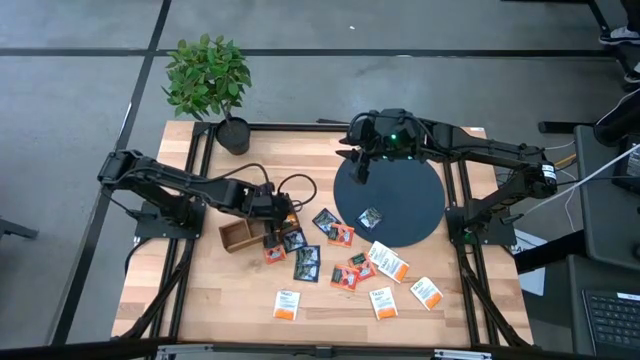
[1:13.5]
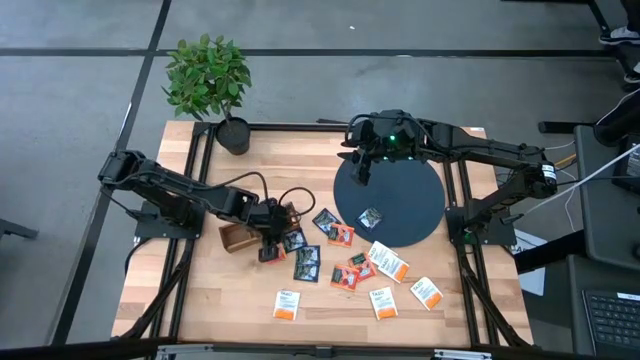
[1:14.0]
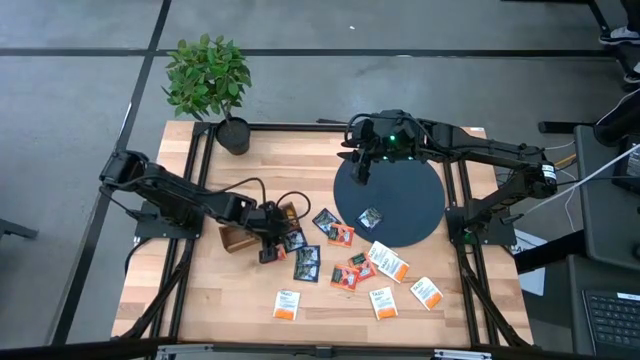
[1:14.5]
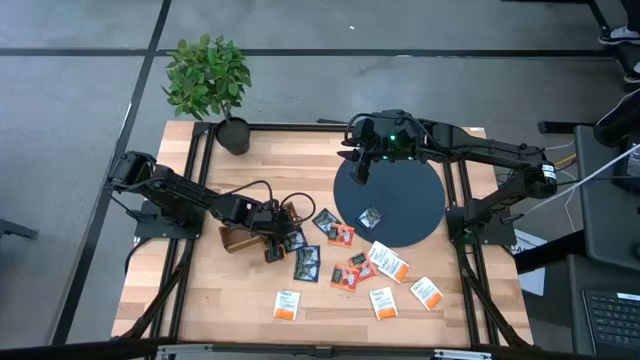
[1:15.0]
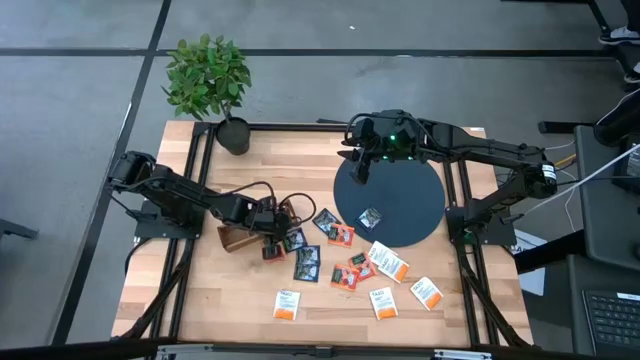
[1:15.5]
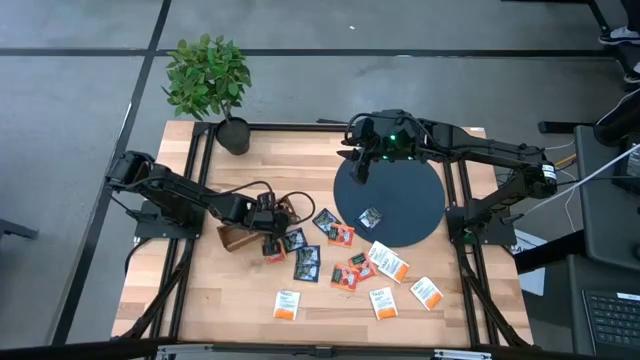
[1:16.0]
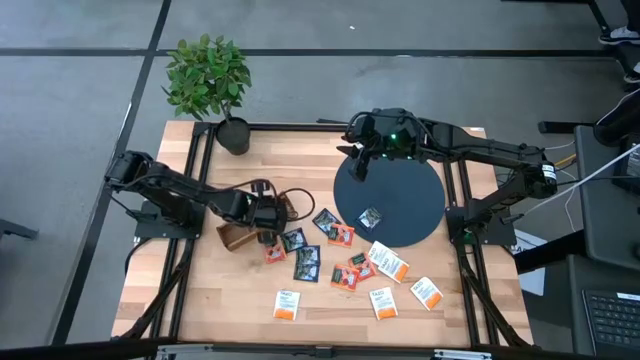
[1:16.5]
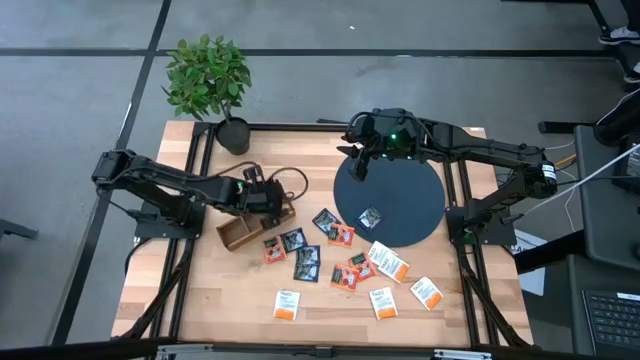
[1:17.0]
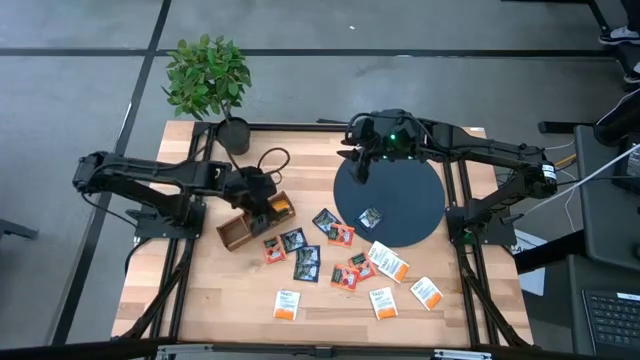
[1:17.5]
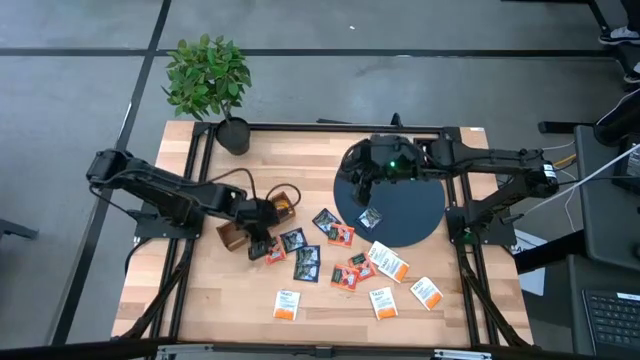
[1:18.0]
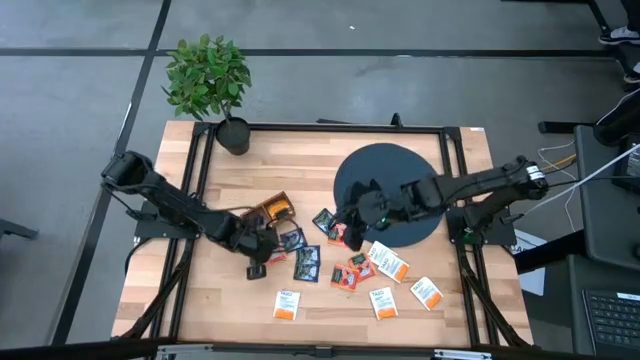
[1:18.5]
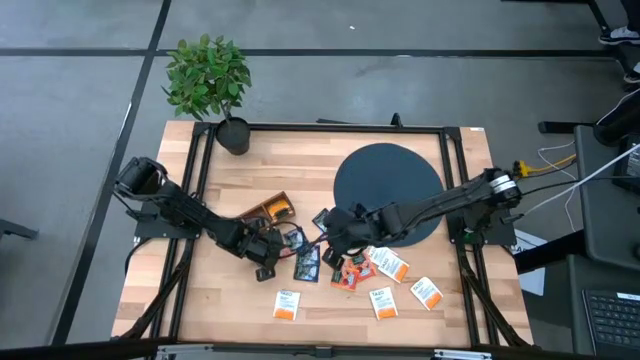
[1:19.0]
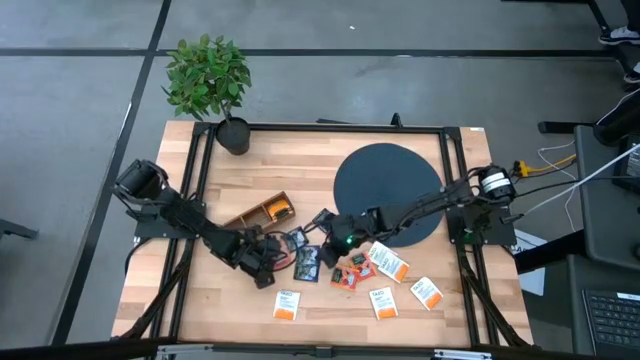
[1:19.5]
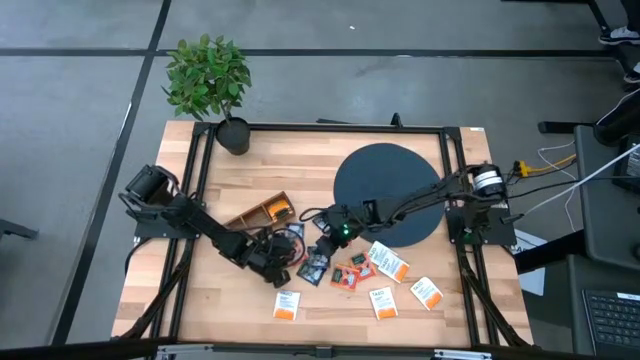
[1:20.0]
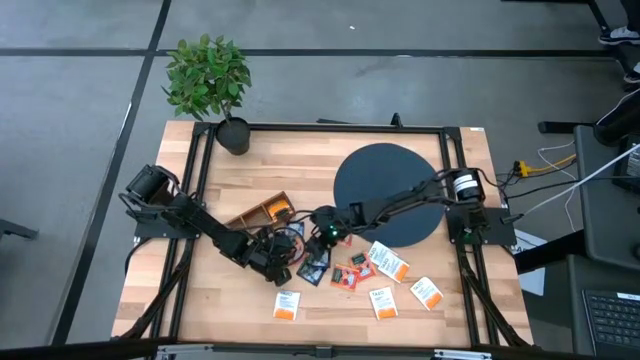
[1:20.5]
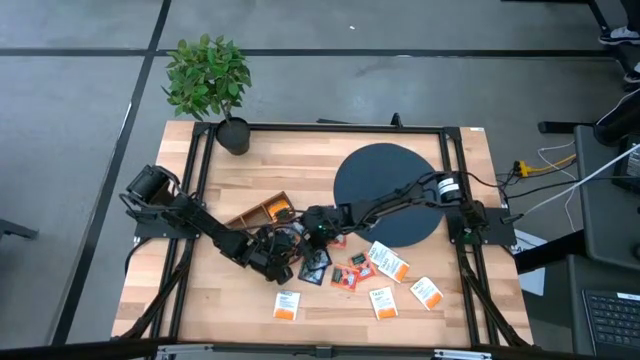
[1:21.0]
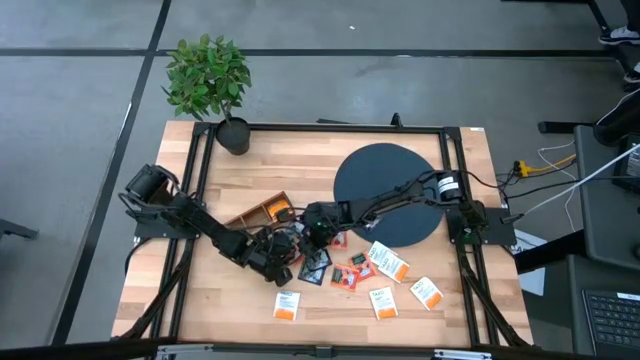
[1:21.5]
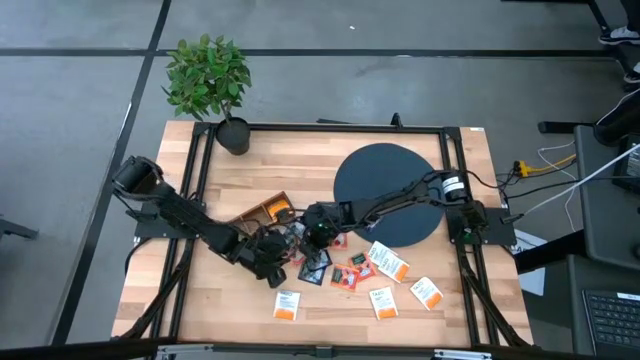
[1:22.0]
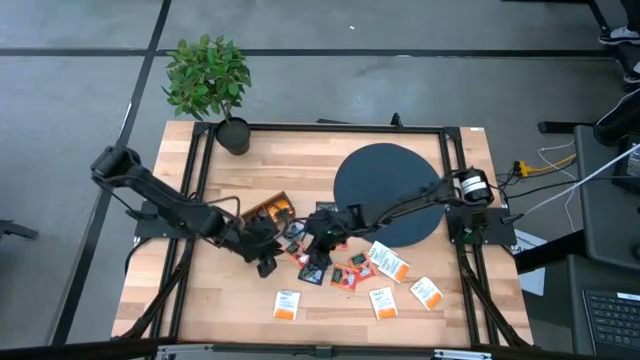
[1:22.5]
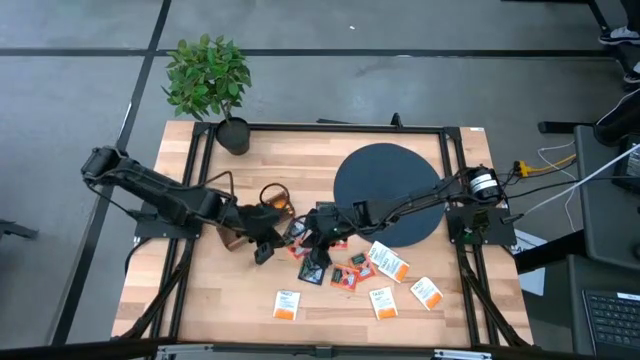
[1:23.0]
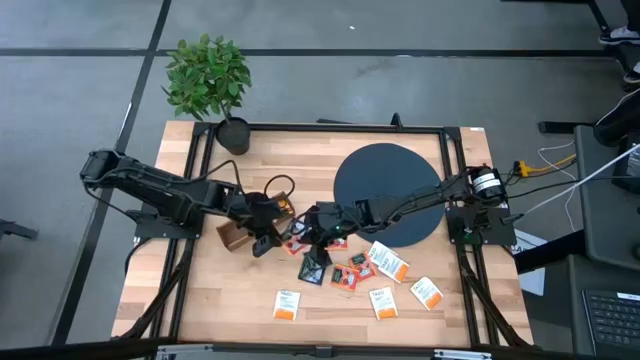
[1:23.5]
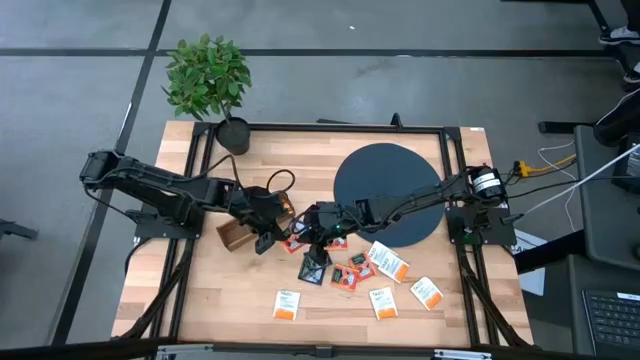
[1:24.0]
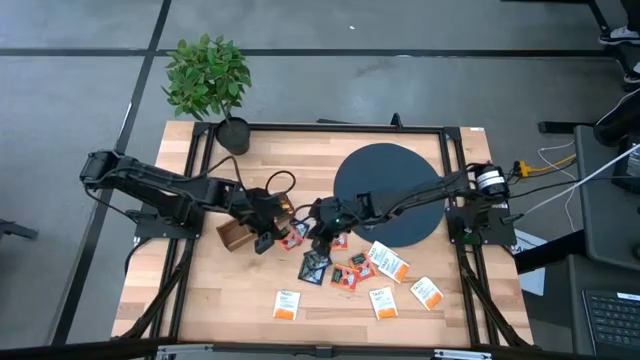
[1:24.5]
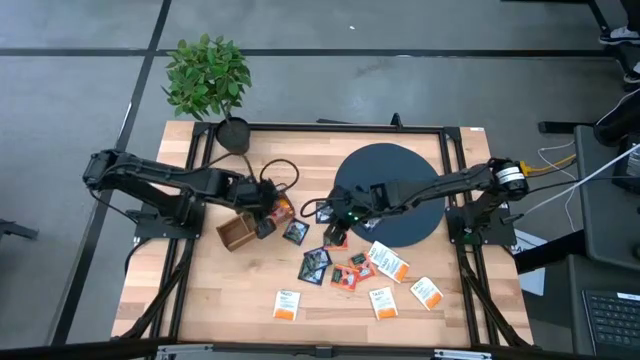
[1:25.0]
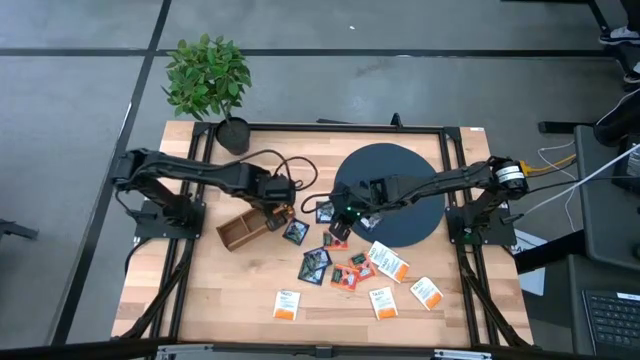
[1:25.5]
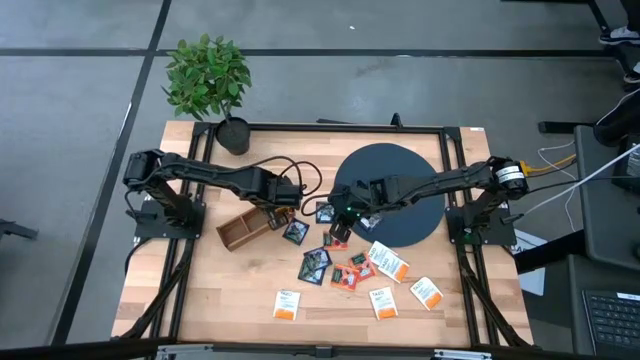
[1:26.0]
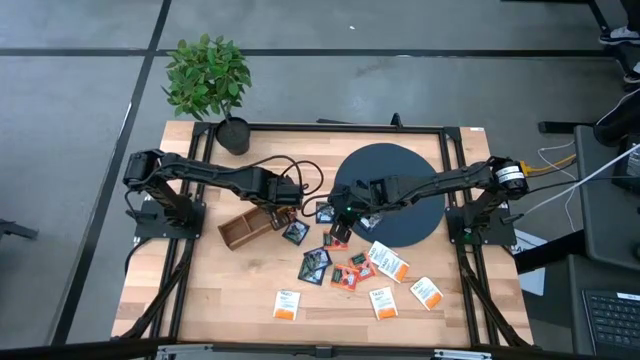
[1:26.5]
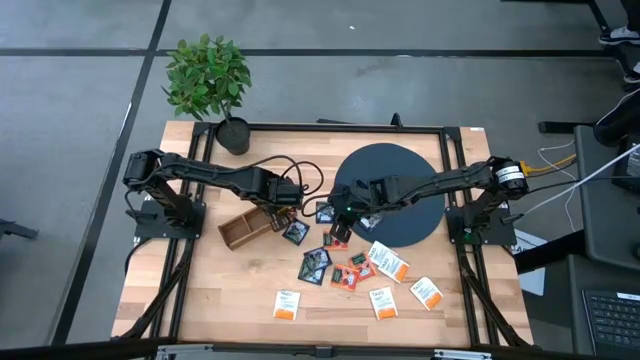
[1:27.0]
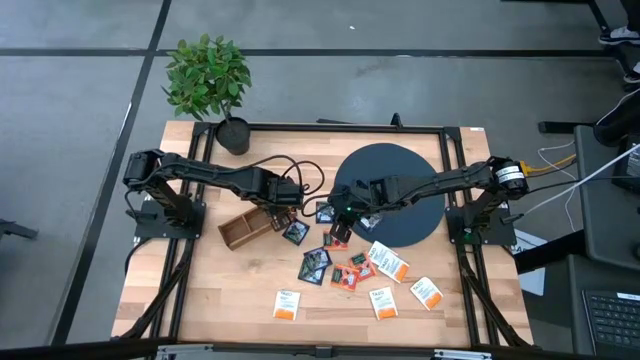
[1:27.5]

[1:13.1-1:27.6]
Task: Pick & Place Tea
Put the orange tea bag into the right section of the wooden organizer

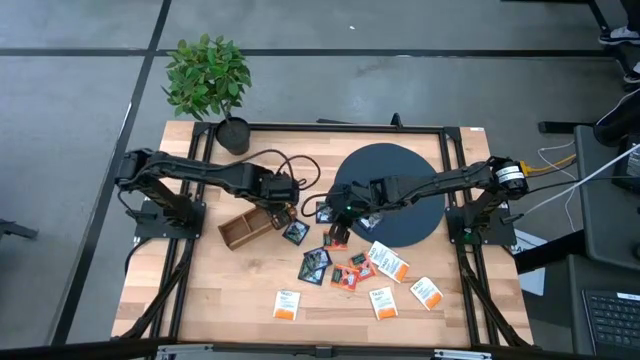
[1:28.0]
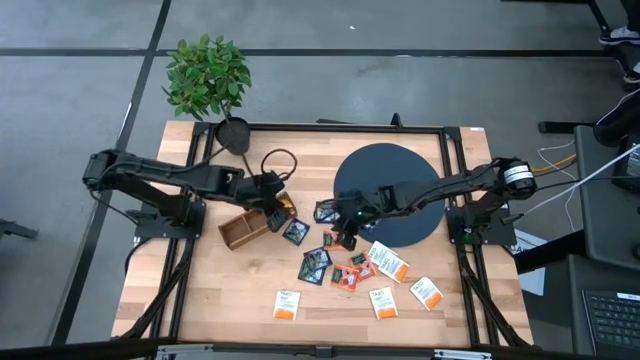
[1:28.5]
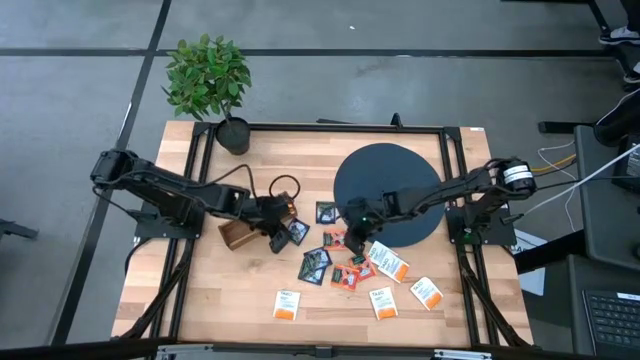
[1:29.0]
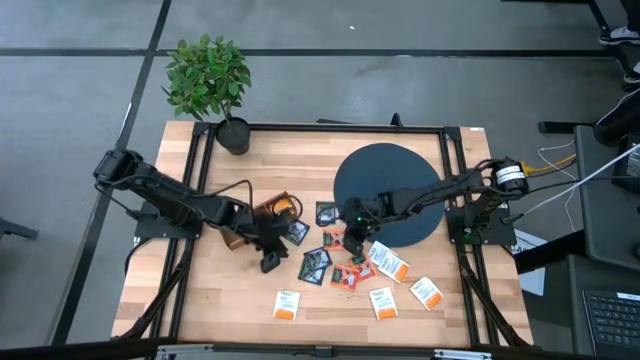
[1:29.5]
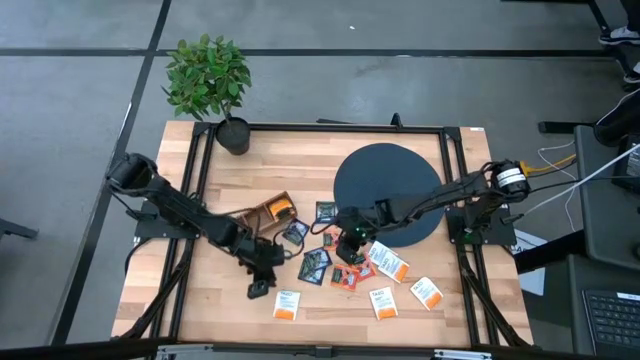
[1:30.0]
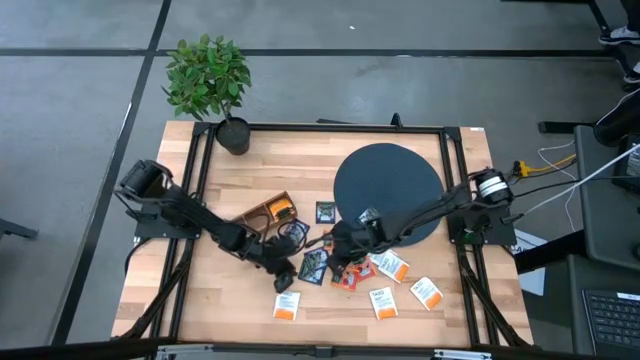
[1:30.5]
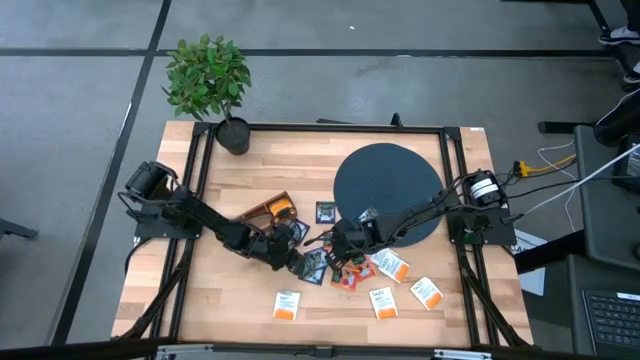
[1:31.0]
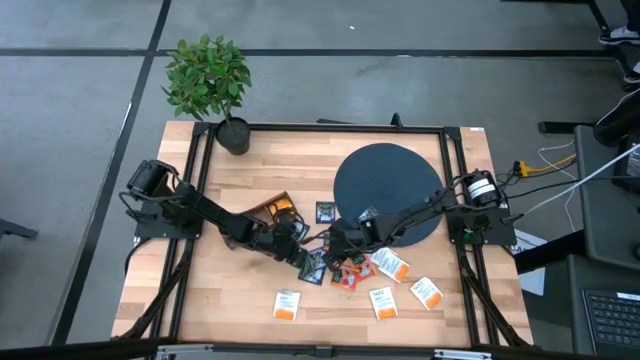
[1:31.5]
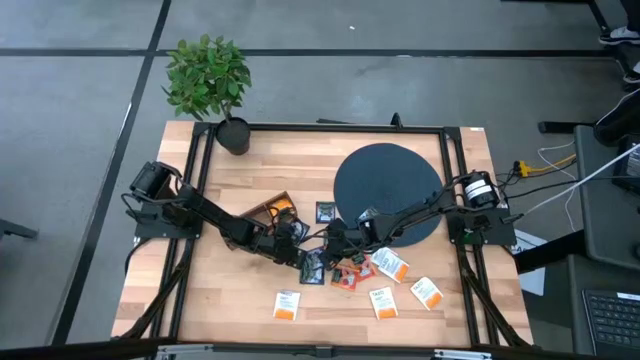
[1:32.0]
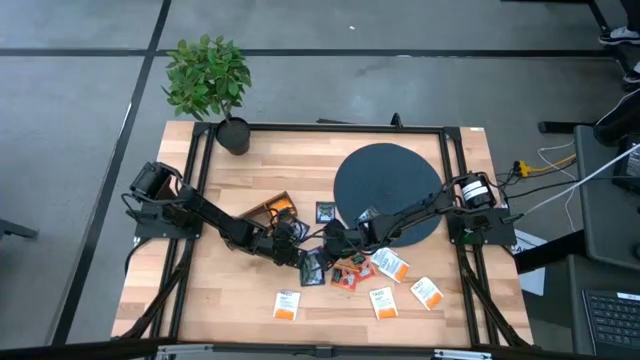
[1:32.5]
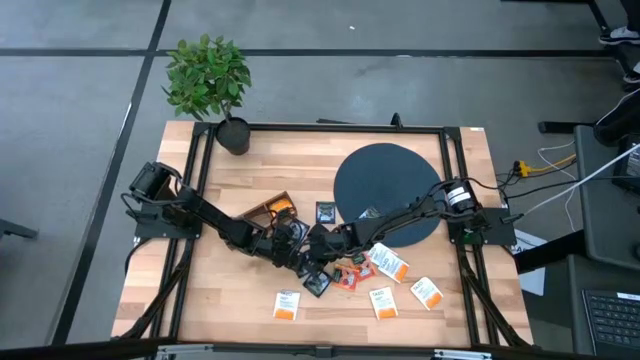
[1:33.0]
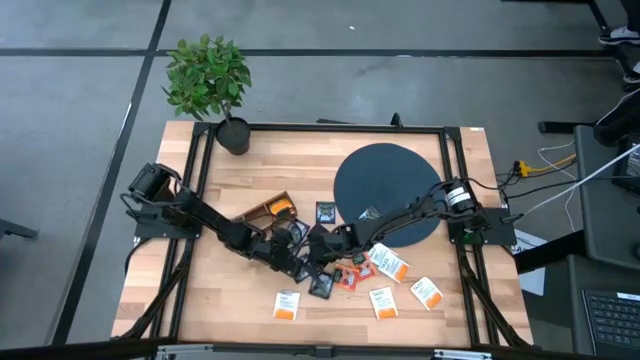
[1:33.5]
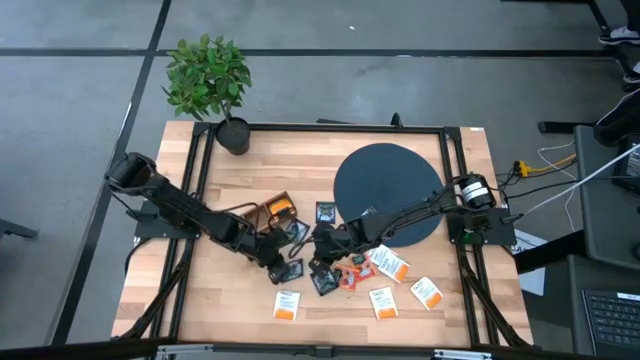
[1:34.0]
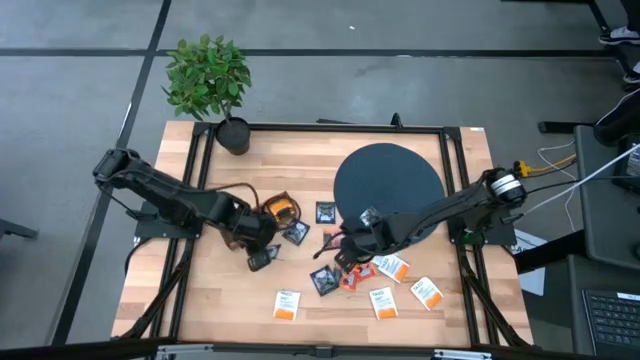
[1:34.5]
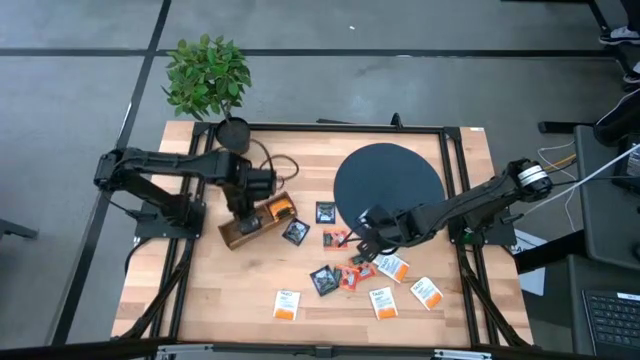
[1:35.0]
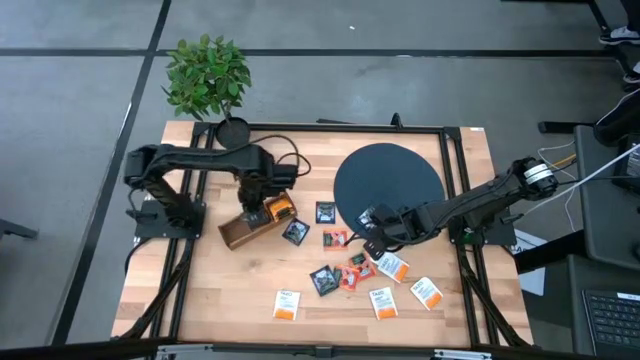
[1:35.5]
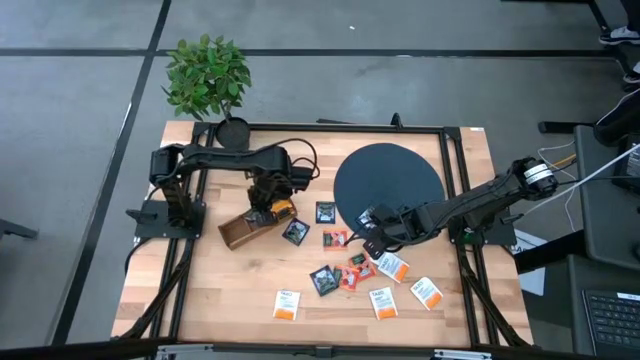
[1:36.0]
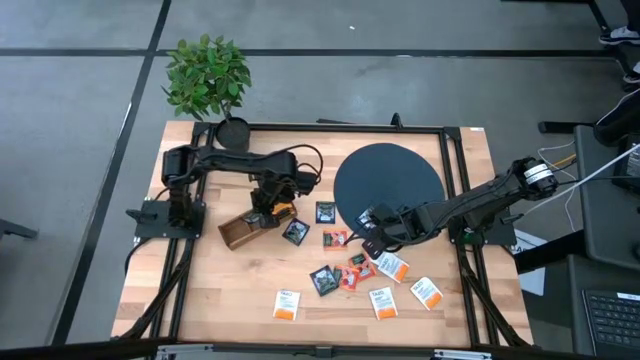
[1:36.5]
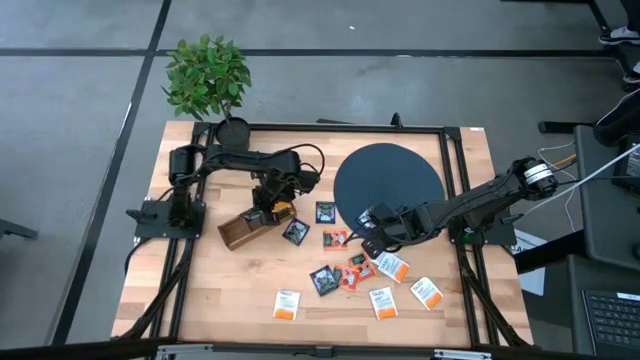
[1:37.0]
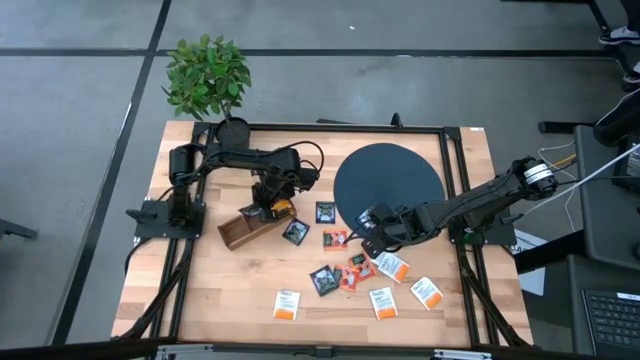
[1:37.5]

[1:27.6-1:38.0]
Put the black tea bag into the middle section of the wooden organizer
